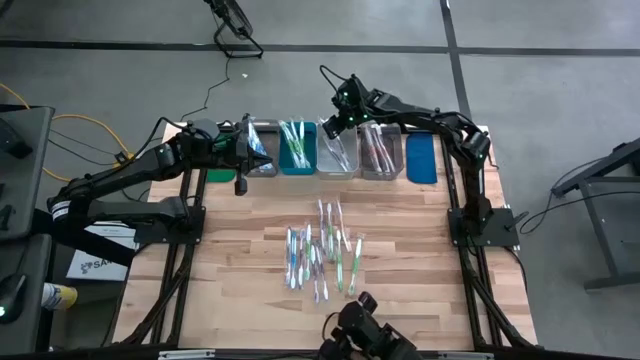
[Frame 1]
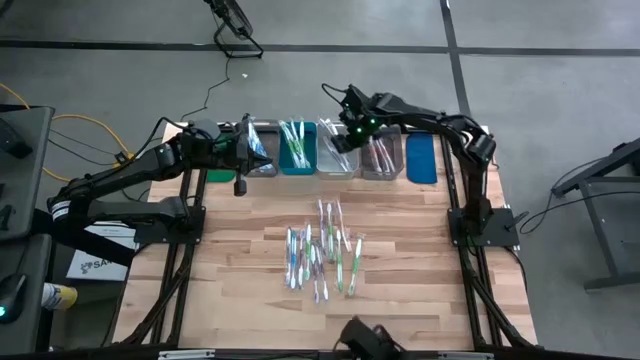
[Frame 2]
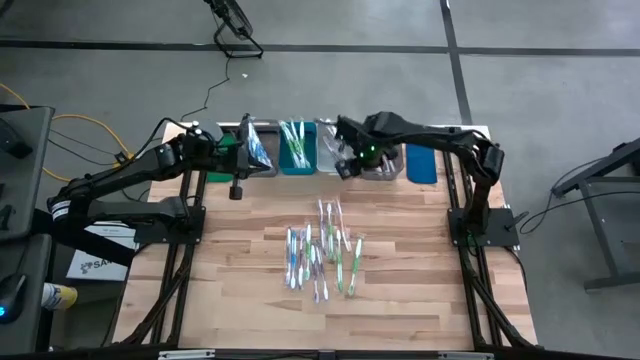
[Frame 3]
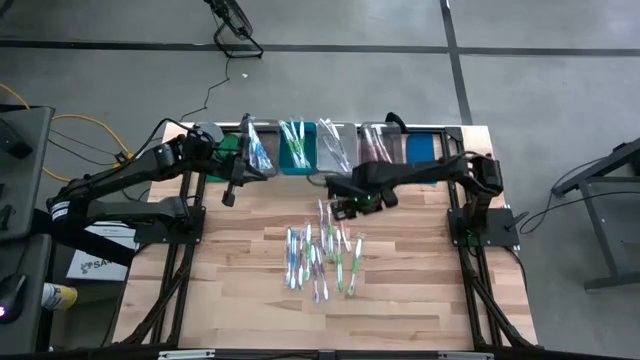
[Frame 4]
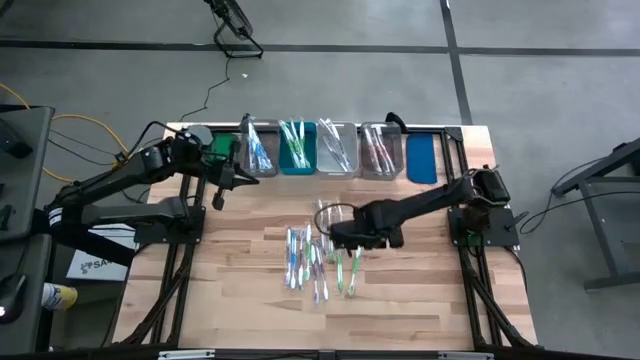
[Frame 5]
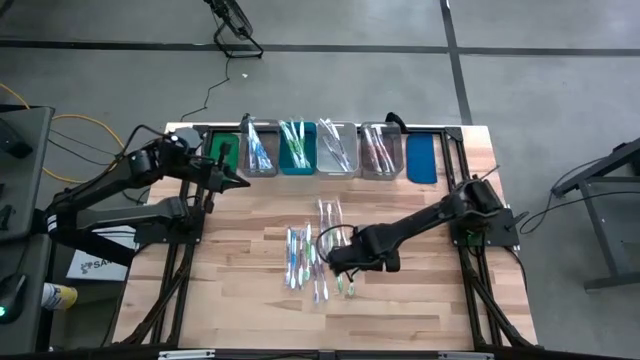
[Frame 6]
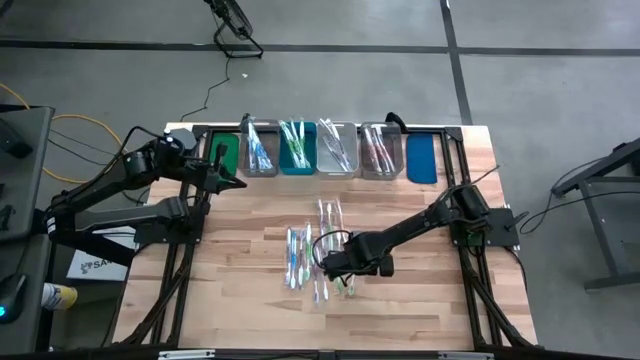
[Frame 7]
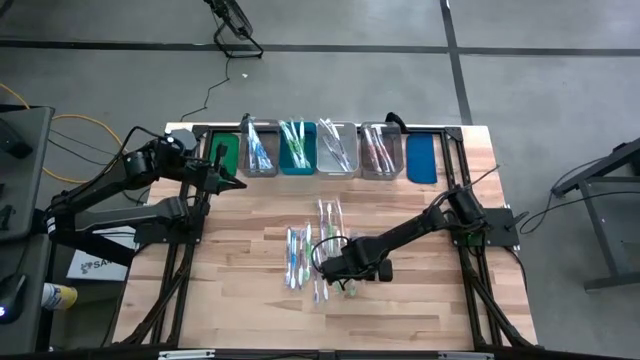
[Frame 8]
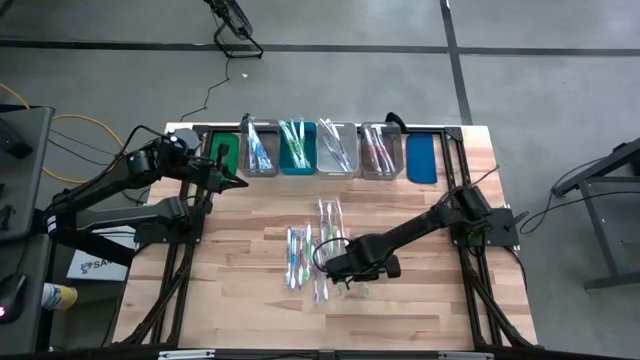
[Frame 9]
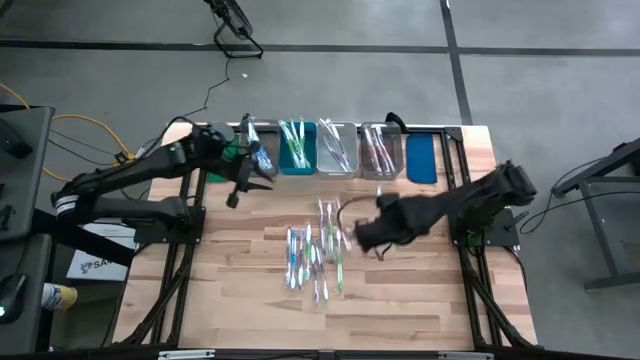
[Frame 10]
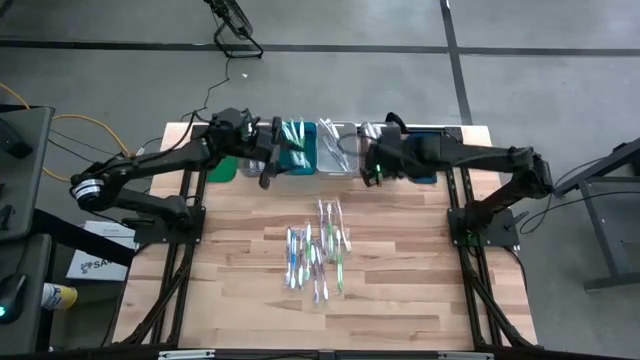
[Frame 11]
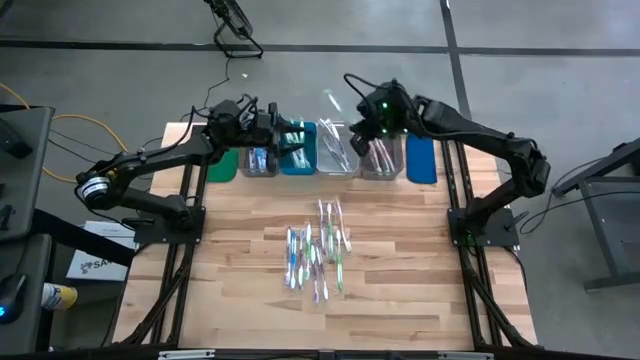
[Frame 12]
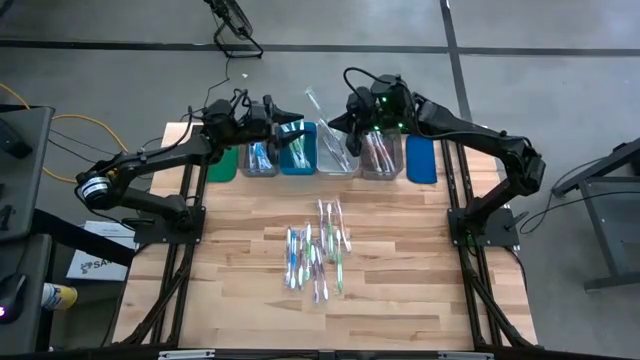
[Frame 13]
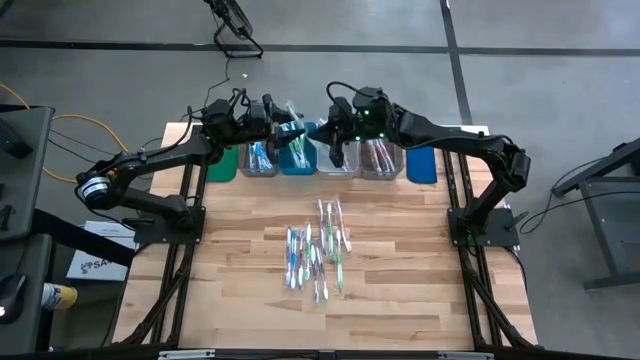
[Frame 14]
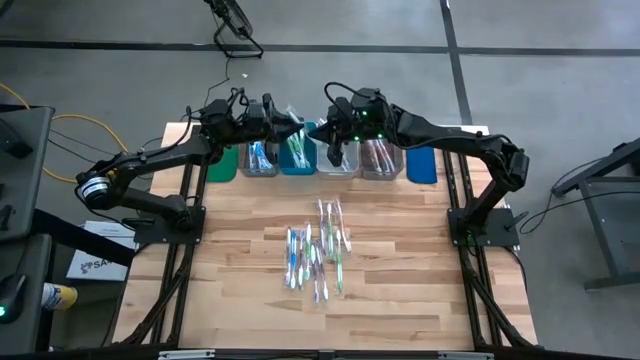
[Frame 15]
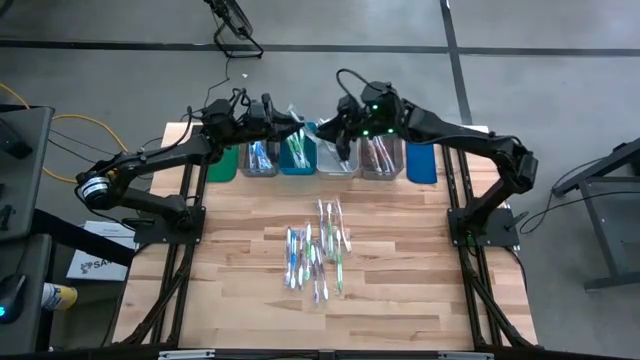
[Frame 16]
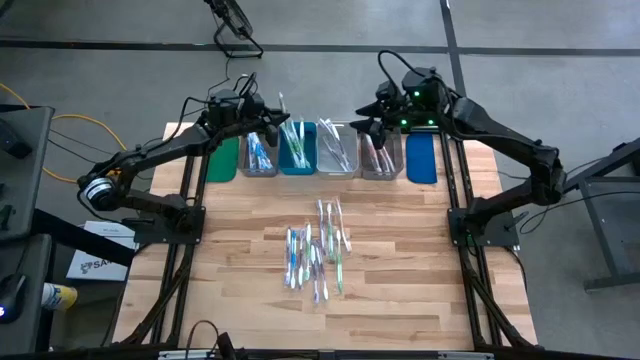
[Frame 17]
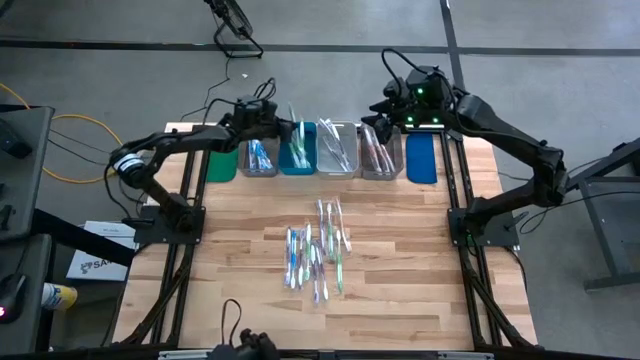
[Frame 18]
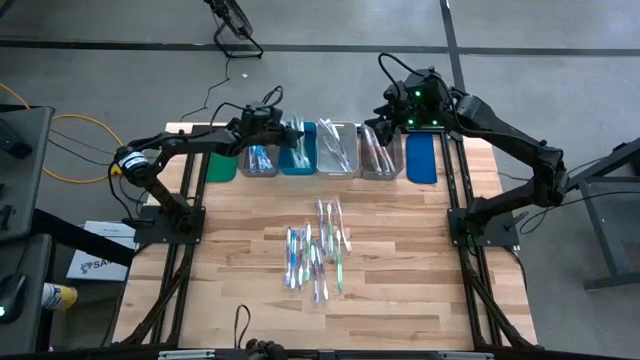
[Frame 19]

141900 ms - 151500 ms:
Task: Pick & Place Toothbrushes
Put the green toothbrush into the blue bin

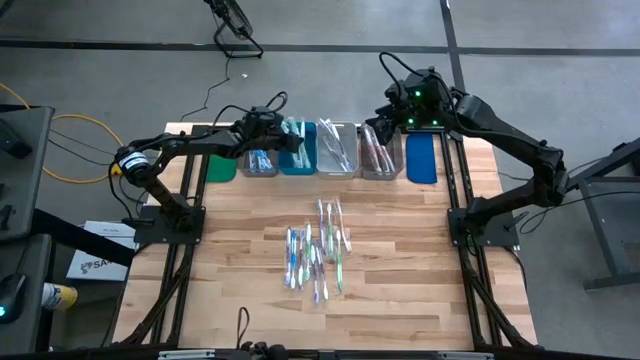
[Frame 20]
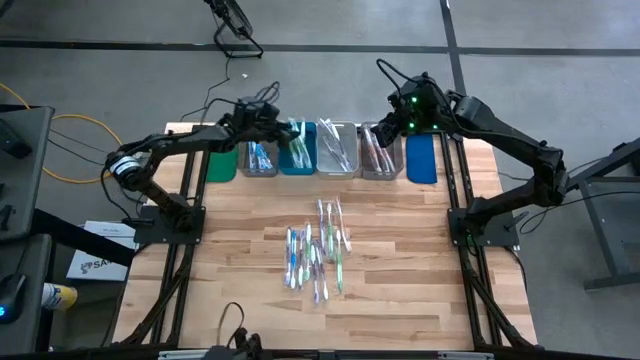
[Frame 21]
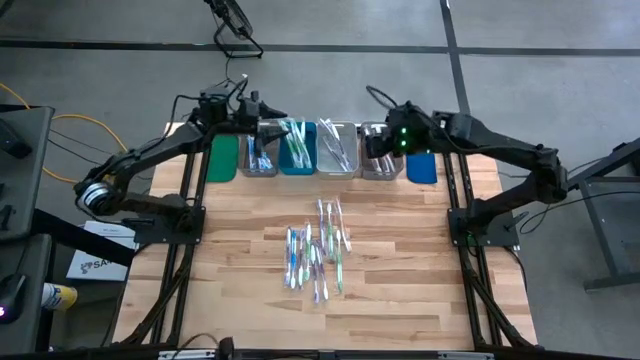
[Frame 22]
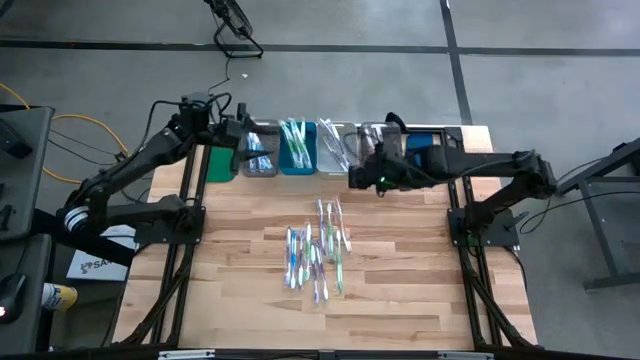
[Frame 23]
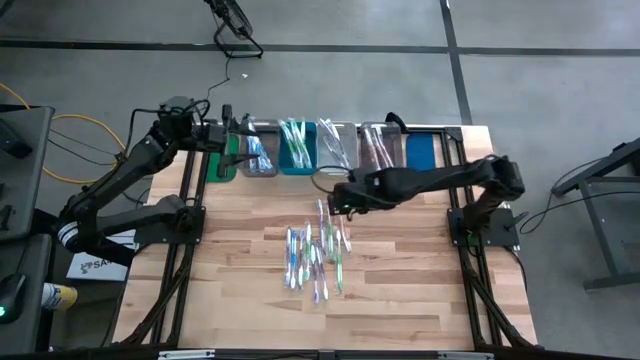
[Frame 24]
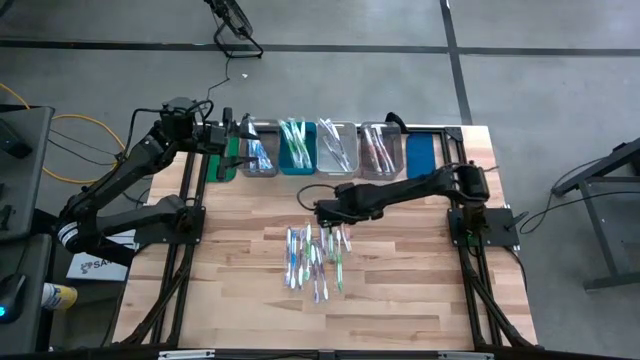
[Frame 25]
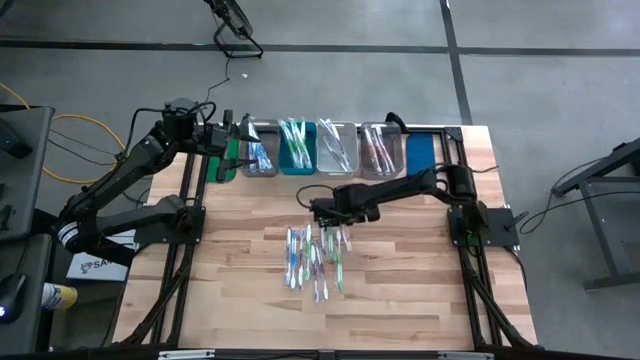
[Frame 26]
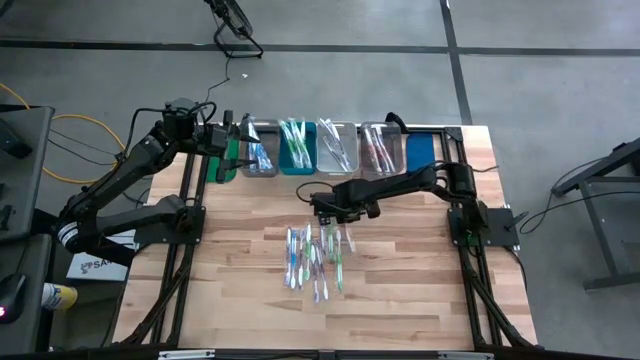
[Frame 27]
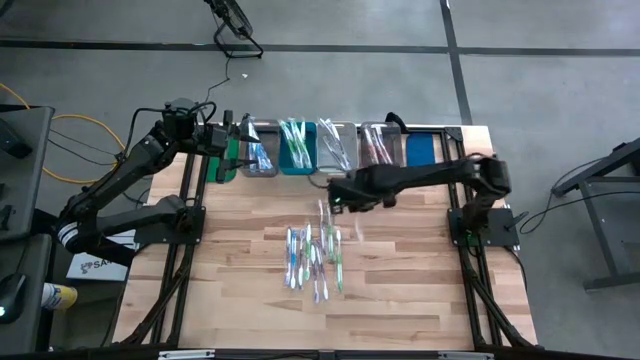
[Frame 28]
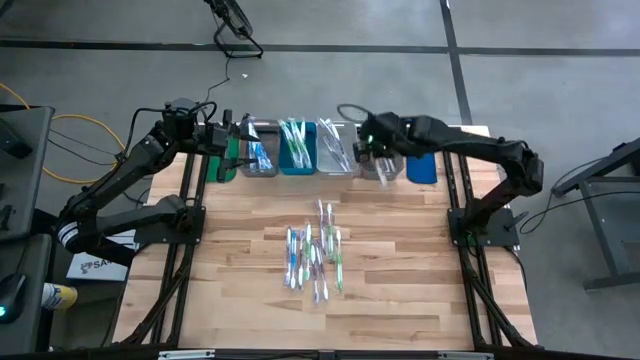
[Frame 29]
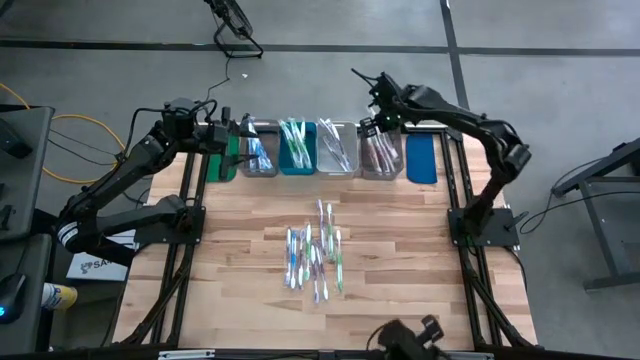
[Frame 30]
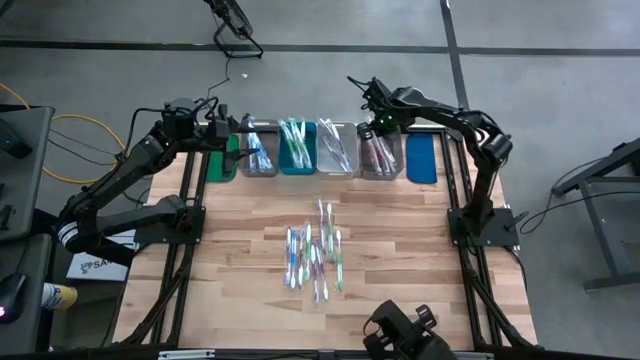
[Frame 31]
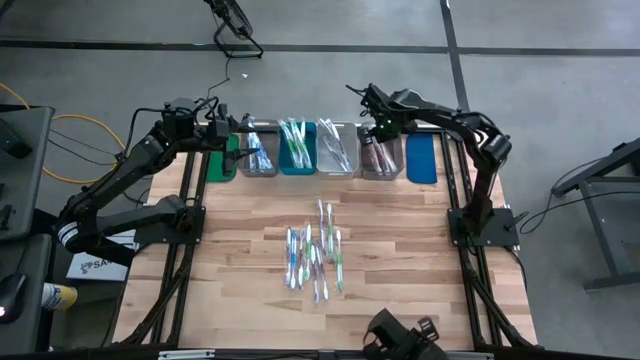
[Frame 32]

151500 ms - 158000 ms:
Put the orange toothbrush into the right black bin

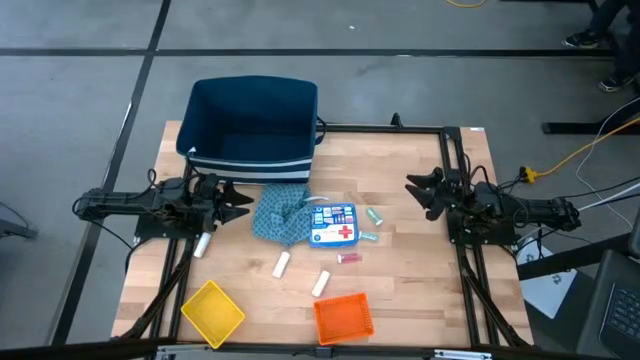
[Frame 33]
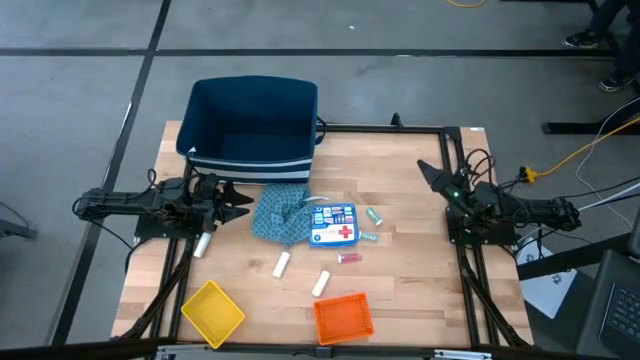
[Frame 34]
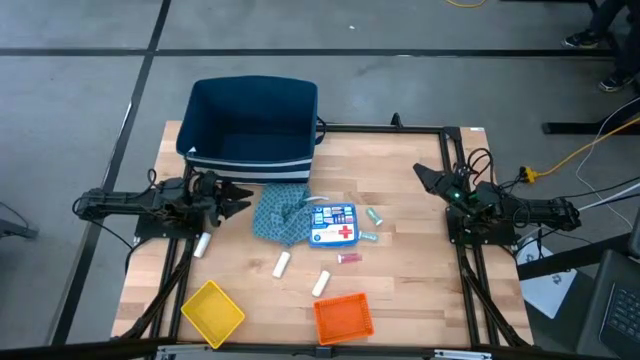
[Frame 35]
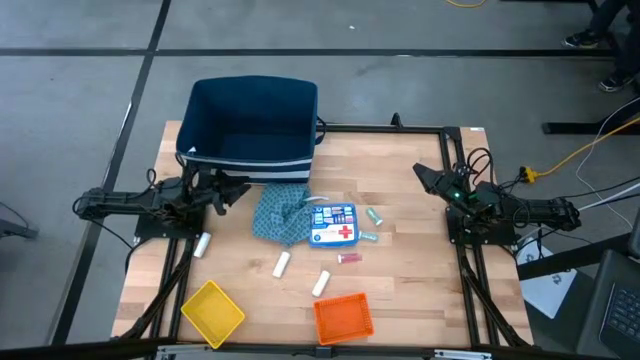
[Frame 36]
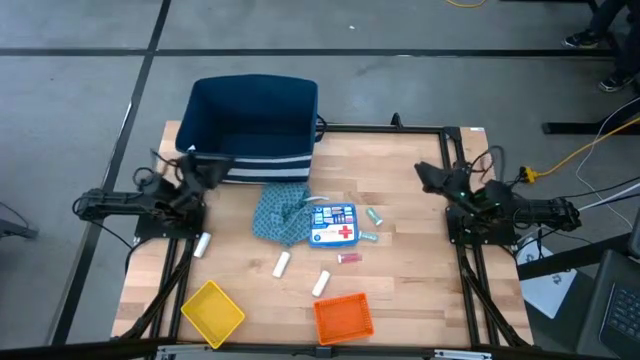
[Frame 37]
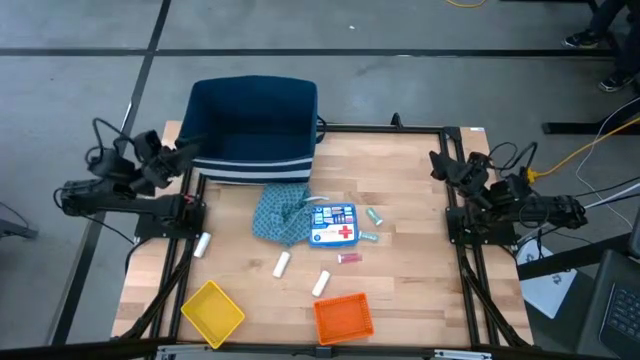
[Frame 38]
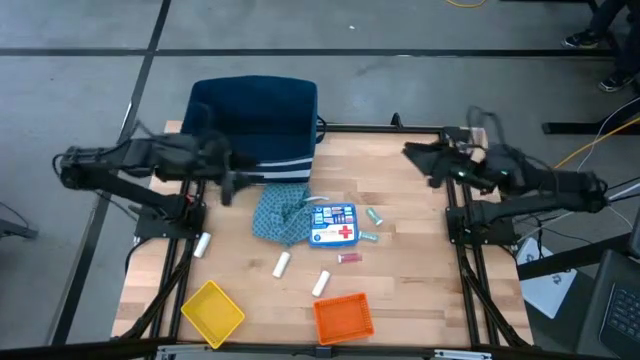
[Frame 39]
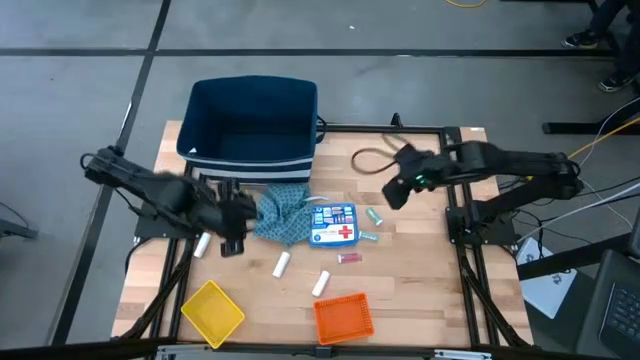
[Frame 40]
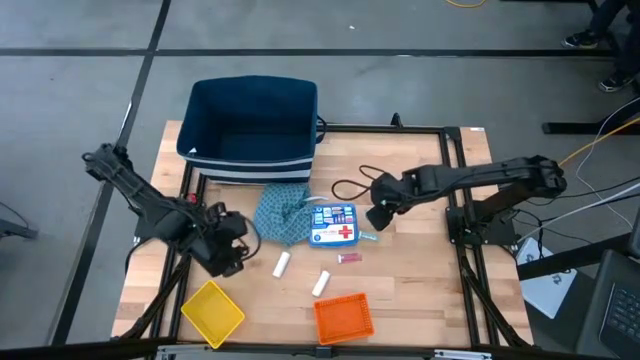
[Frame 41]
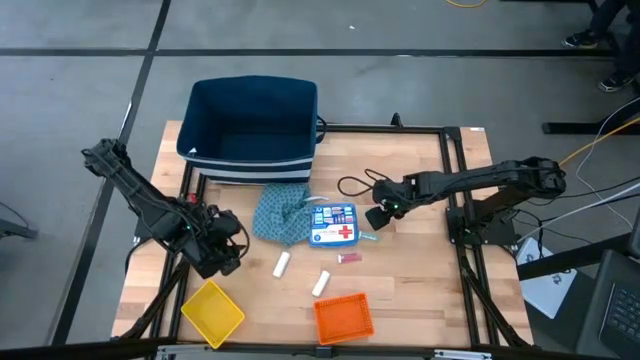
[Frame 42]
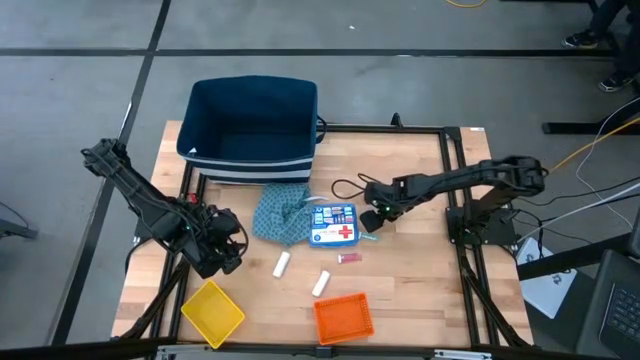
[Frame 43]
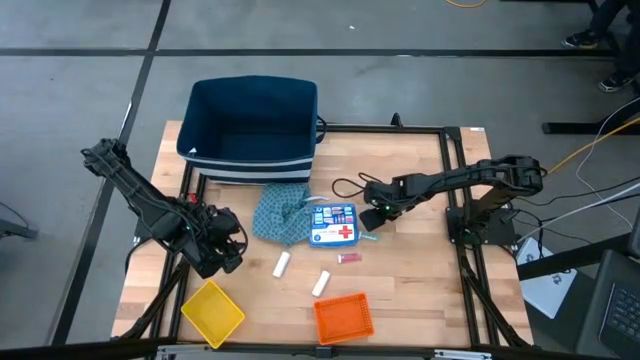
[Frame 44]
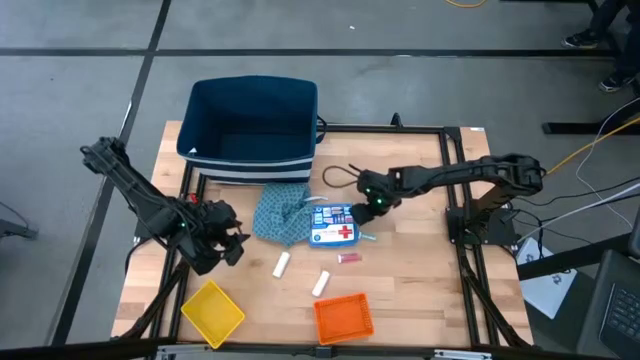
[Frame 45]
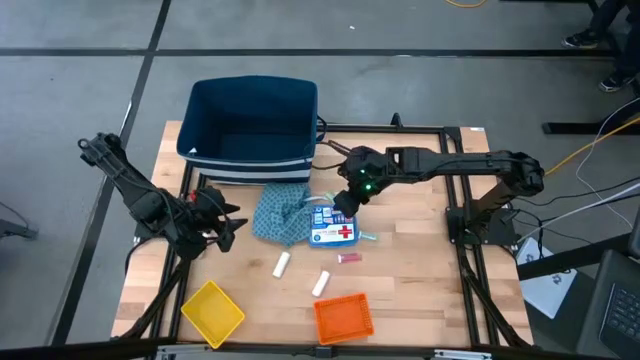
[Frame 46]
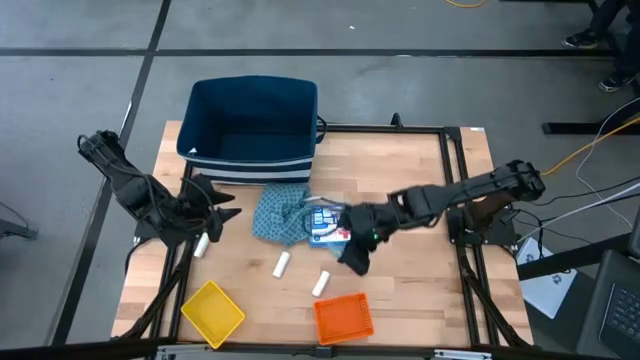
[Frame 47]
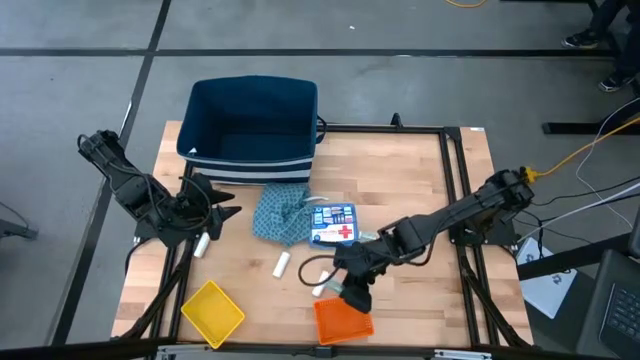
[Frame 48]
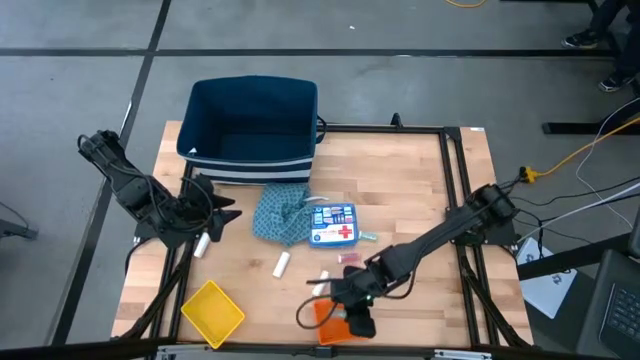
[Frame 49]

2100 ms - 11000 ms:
Task: Pick & Place Medicine items
Put the top blue pill bottle into the orange bin
